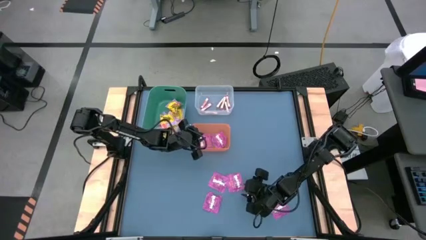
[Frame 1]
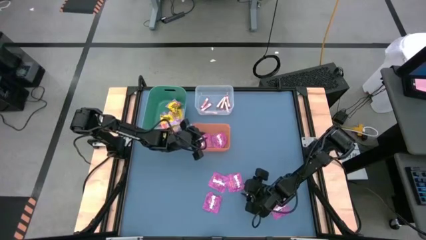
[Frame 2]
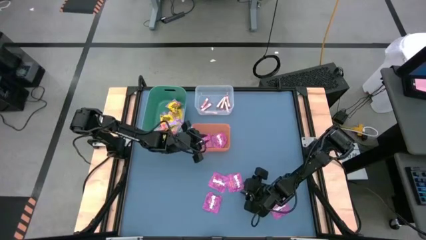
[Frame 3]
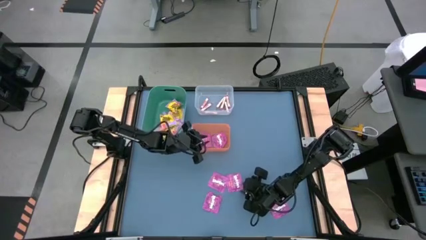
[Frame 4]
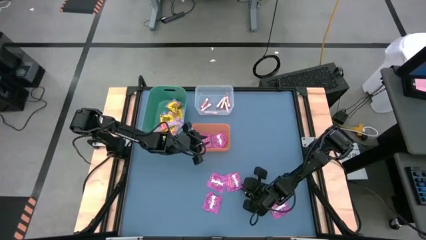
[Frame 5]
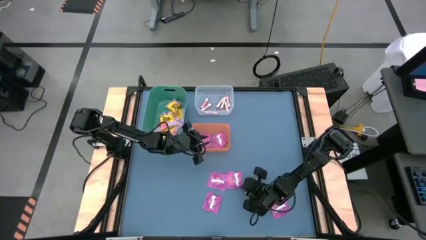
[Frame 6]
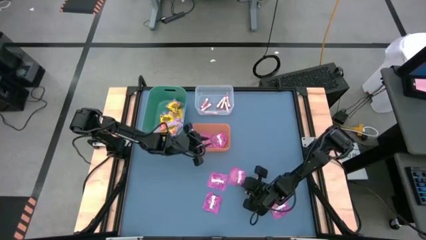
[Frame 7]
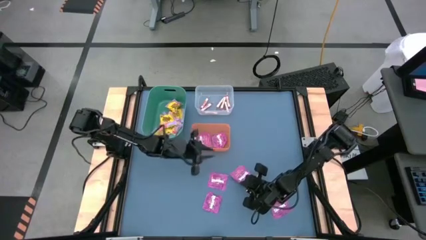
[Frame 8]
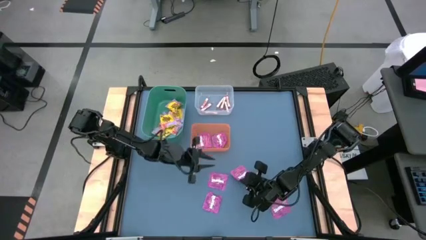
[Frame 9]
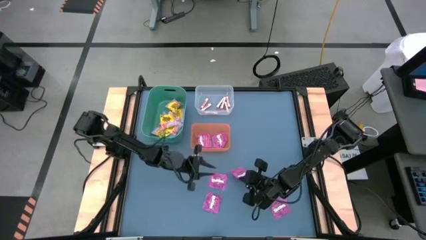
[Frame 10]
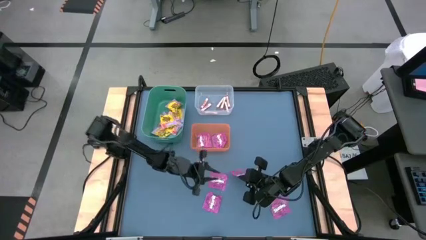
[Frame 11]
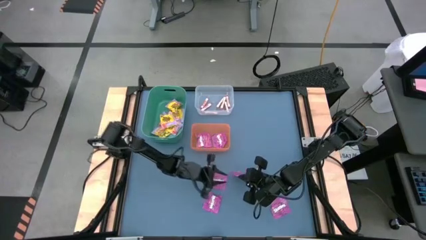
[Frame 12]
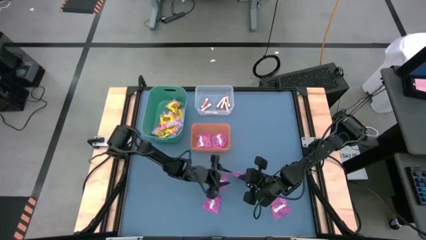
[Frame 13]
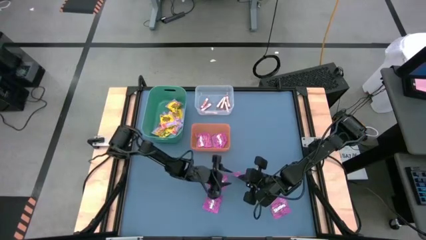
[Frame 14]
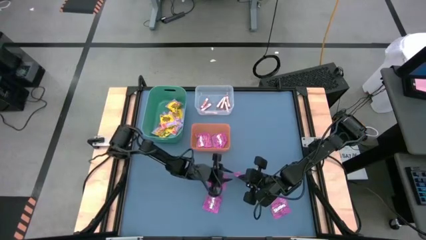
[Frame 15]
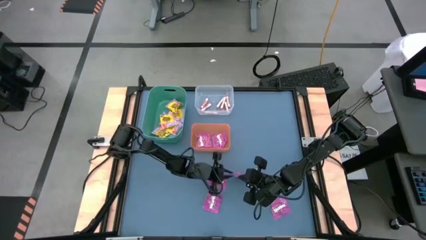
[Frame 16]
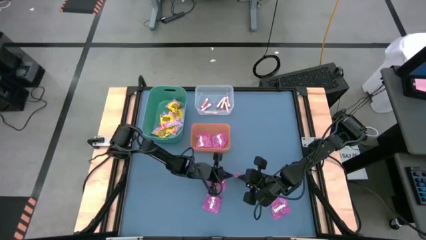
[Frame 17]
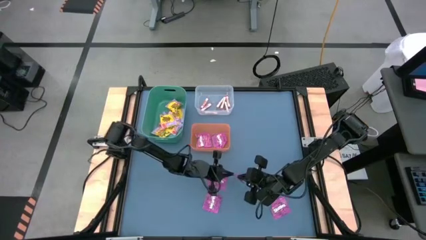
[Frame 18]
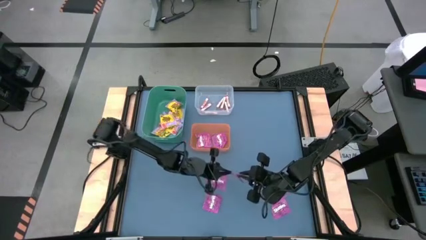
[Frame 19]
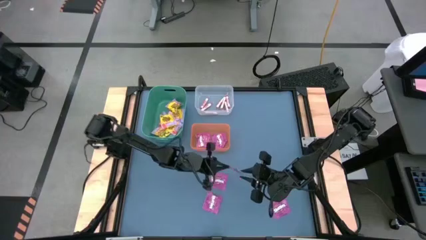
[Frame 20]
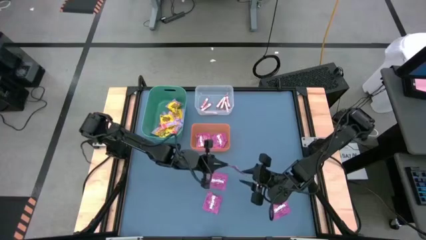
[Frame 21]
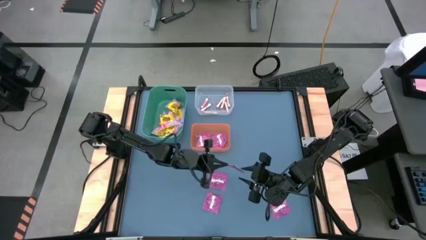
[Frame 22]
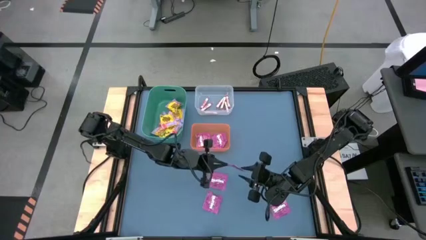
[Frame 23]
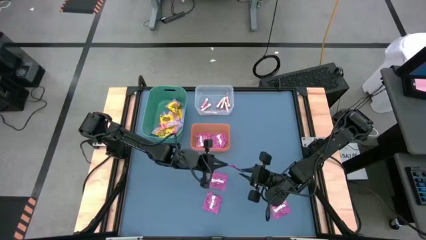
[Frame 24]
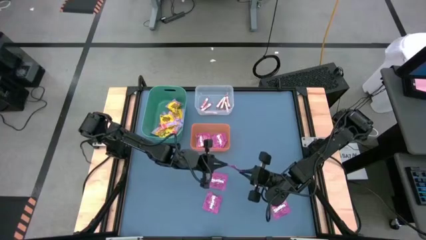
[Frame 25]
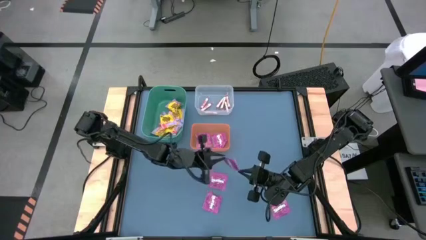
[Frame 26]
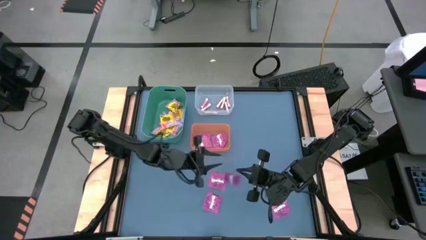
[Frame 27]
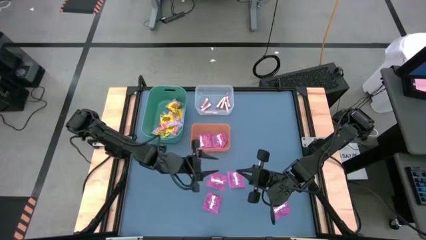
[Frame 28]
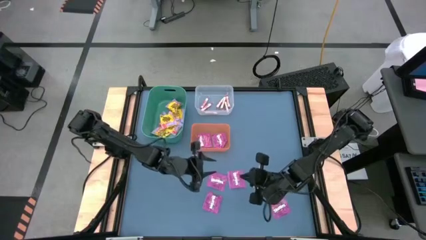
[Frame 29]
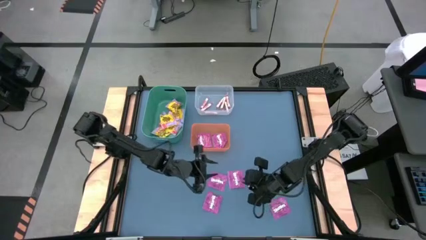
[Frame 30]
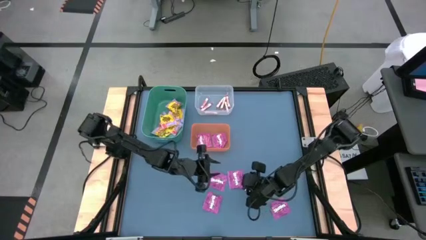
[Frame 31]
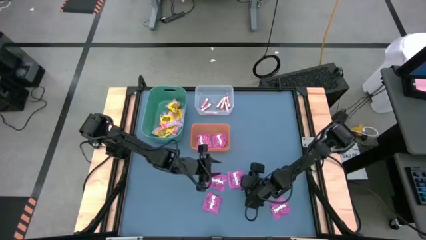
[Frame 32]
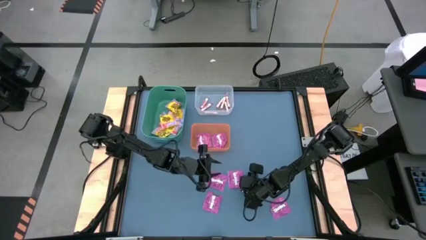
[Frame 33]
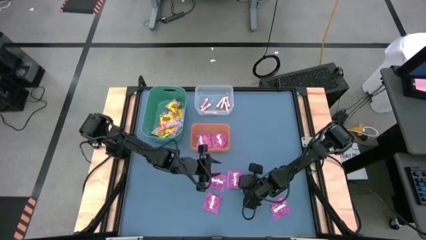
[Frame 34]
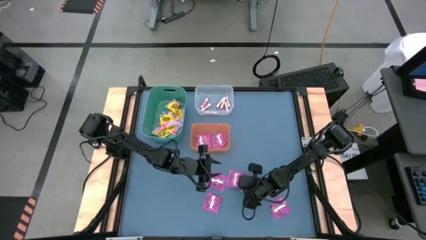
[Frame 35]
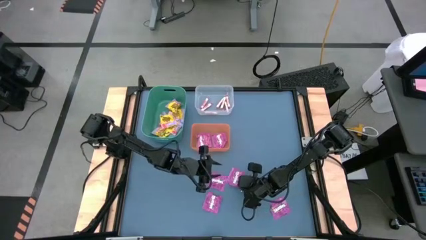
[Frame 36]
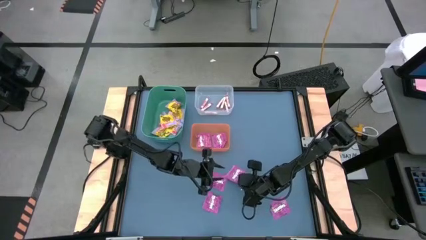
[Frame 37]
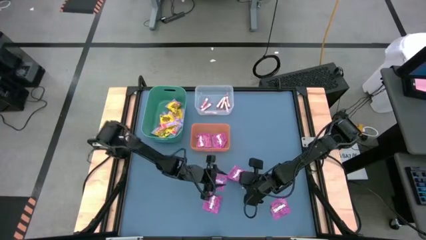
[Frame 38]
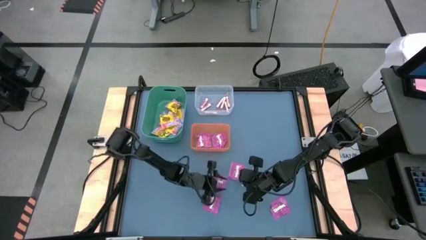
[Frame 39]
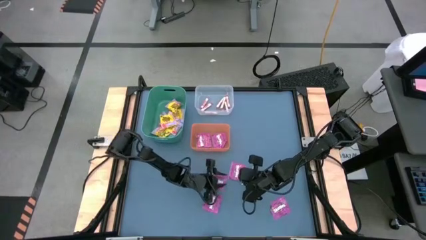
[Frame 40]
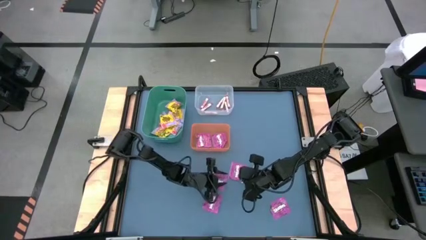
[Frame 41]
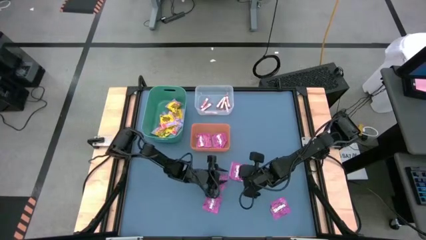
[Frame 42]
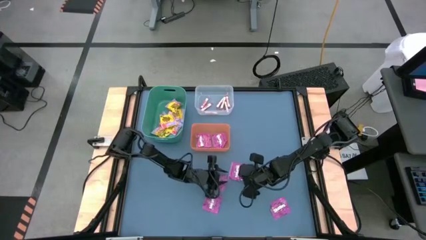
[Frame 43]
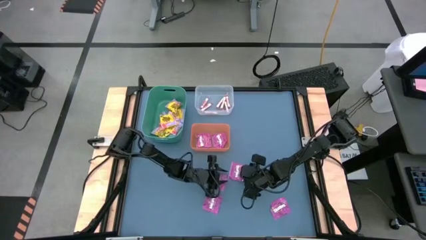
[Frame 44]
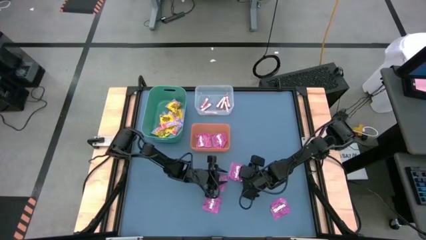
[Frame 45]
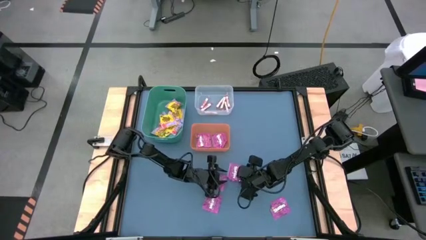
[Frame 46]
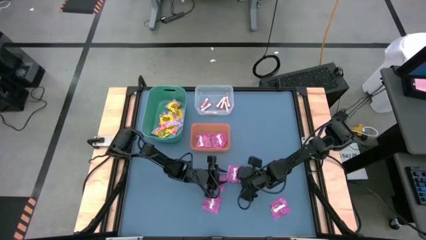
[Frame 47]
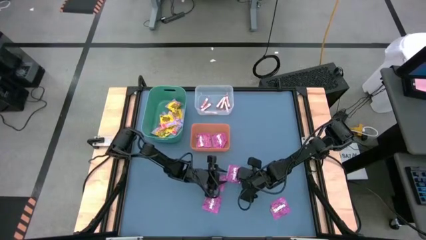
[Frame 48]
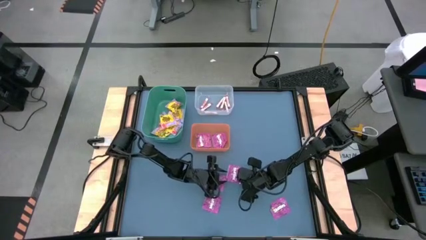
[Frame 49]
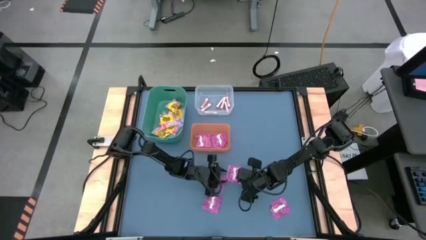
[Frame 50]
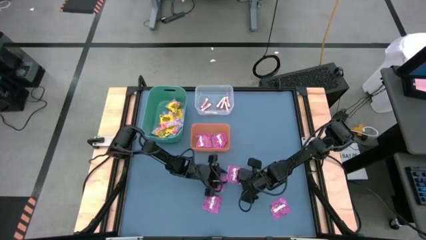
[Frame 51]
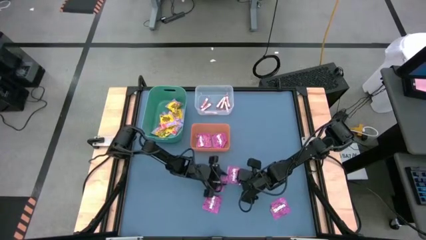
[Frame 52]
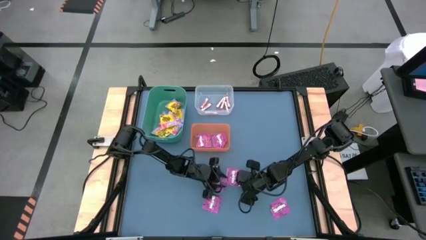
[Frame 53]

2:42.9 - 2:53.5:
Task: Sort candy
Put the violet candy into the orange bin

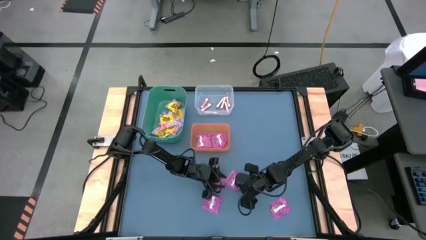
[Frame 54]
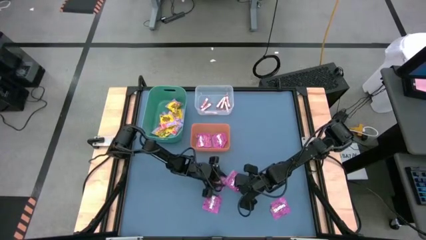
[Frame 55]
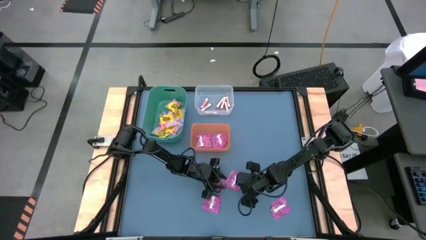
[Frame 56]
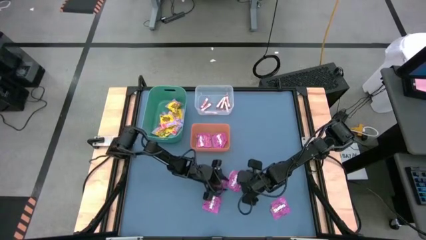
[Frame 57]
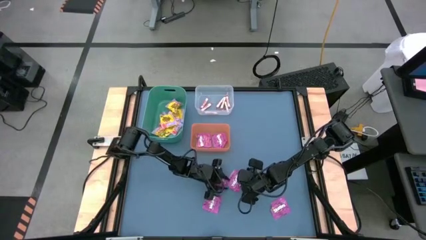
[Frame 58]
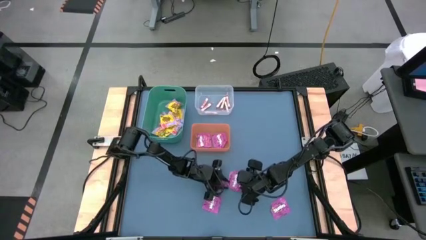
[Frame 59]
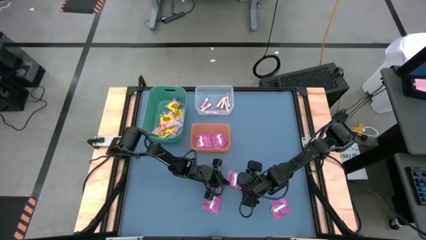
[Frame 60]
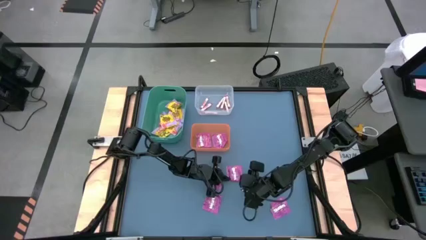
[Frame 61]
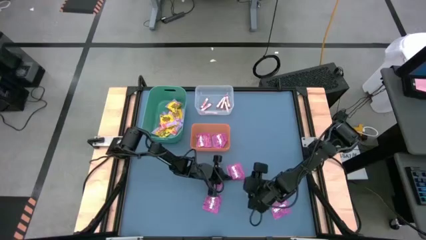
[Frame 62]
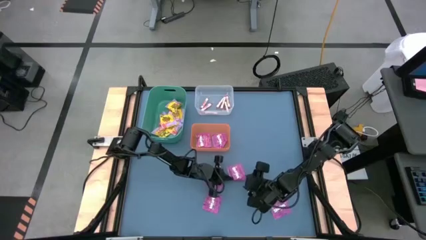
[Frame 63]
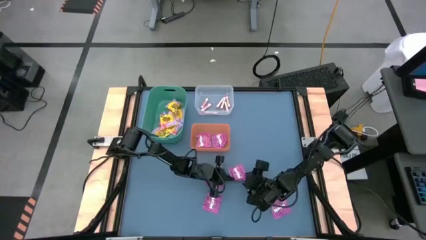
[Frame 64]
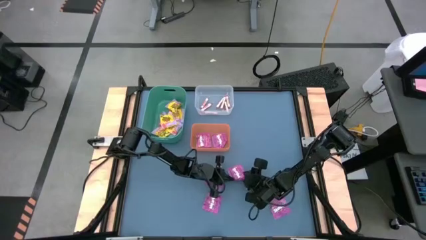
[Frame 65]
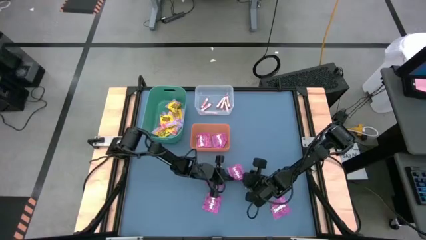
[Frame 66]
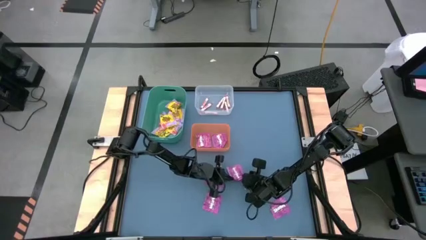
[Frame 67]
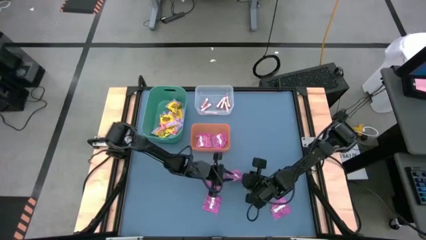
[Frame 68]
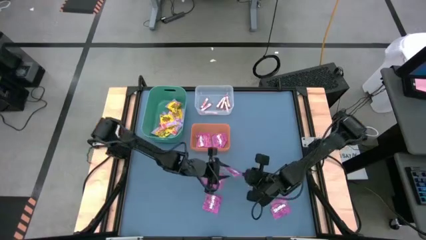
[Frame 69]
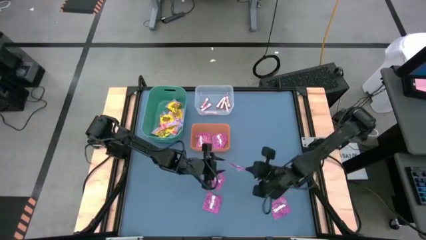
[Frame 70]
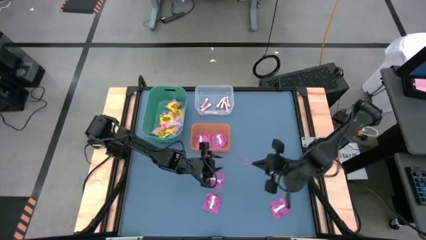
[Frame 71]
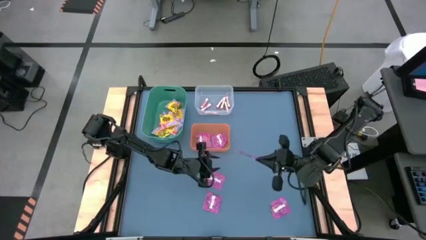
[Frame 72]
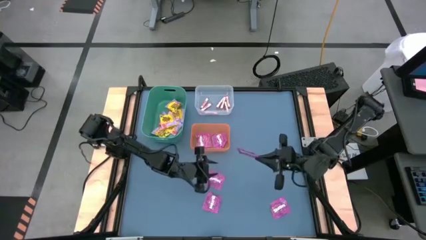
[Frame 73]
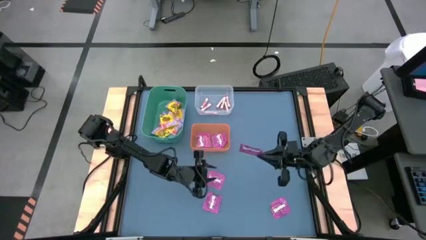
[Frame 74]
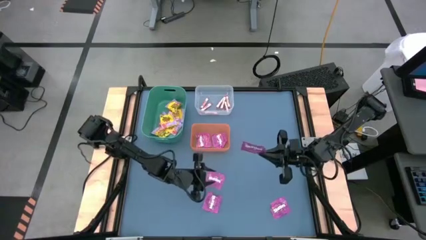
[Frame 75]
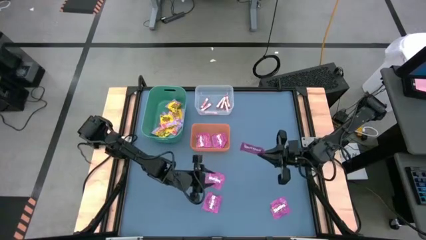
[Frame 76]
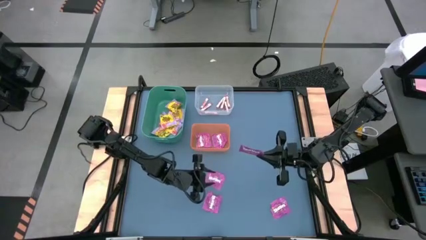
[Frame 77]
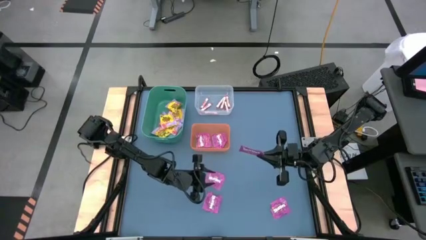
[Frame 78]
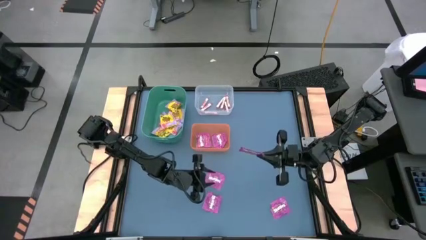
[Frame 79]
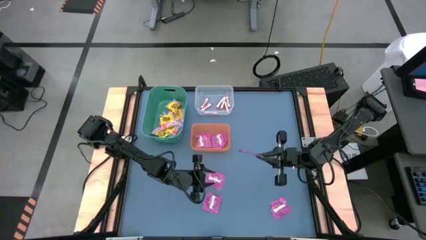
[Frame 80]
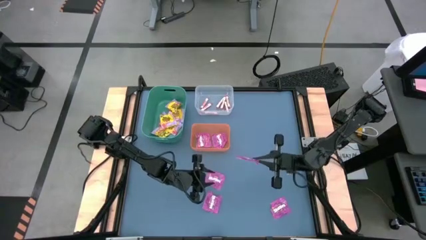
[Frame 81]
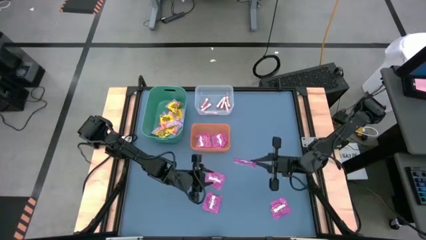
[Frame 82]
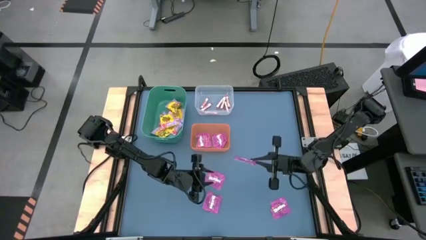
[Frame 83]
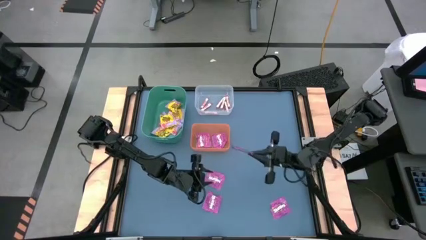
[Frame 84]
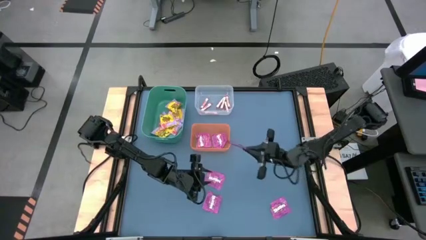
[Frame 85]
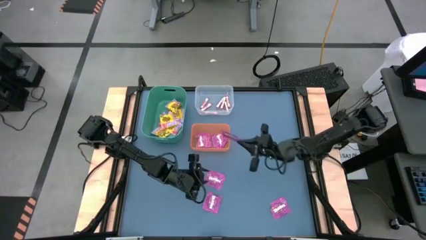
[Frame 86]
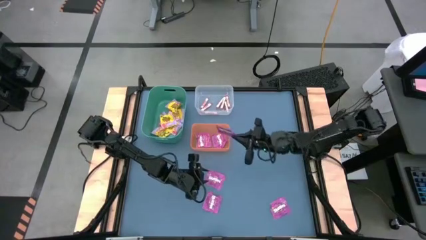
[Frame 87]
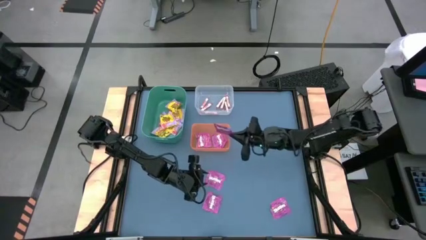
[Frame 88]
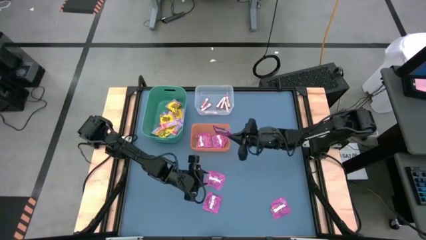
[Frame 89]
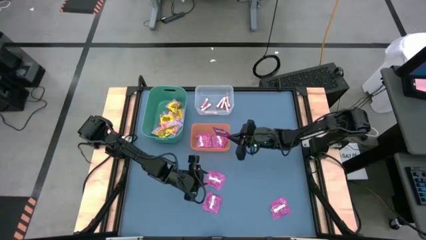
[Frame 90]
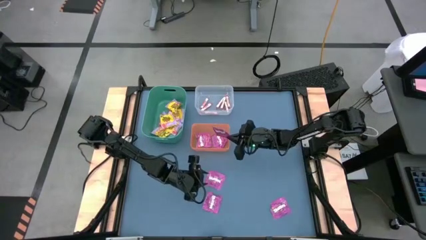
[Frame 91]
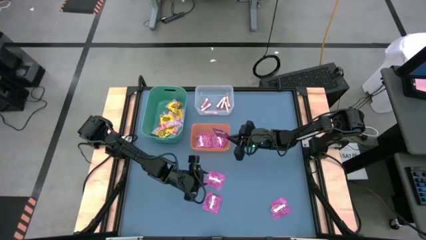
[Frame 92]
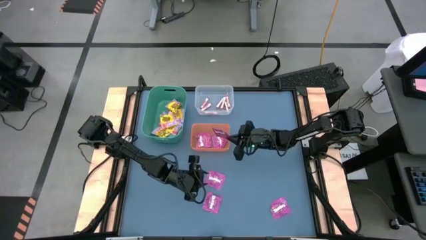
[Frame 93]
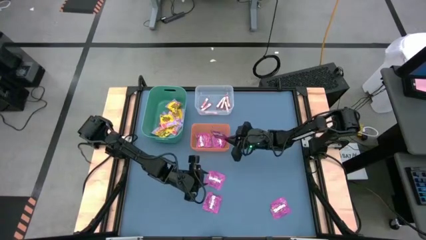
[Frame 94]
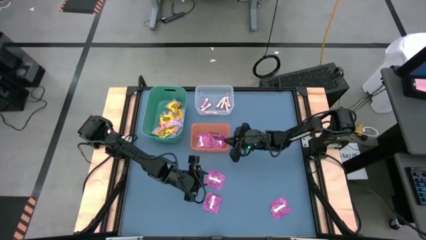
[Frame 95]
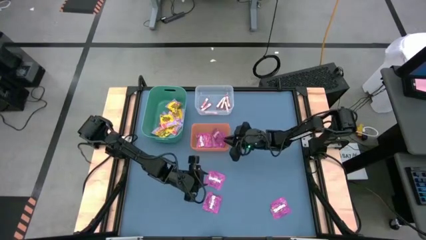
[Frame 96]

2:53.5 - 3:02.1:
Put the violet candy into the orange bin
